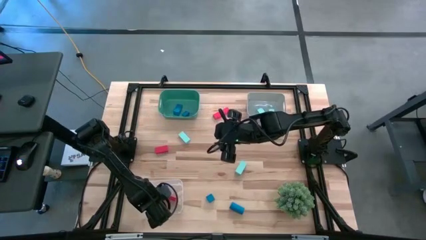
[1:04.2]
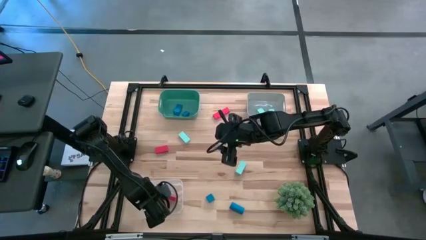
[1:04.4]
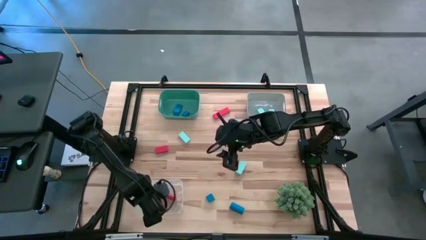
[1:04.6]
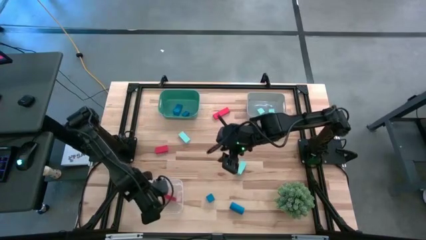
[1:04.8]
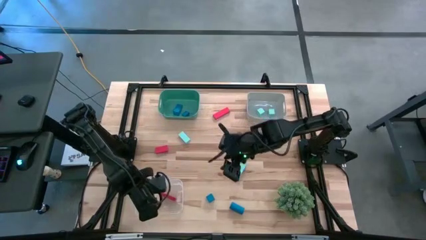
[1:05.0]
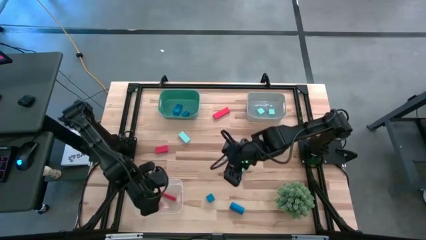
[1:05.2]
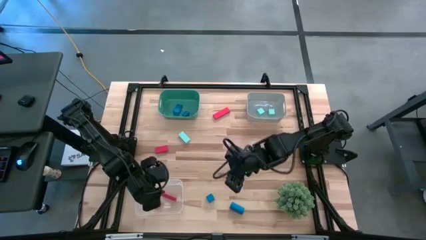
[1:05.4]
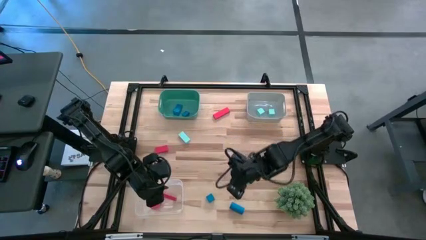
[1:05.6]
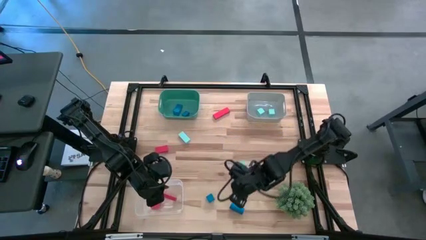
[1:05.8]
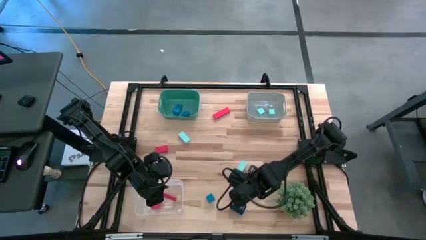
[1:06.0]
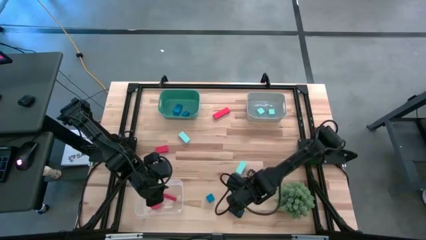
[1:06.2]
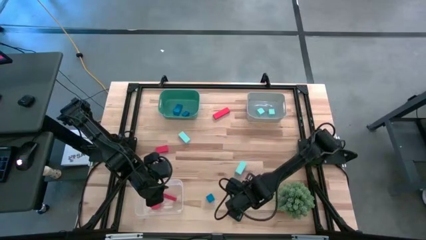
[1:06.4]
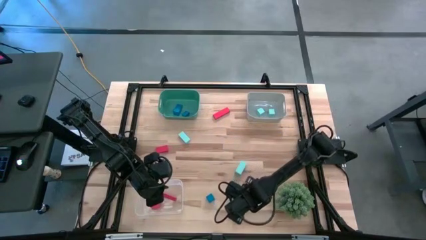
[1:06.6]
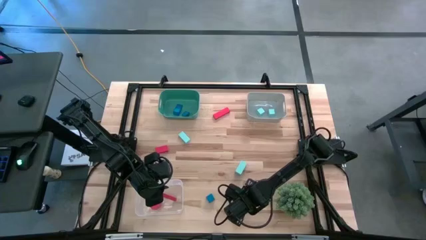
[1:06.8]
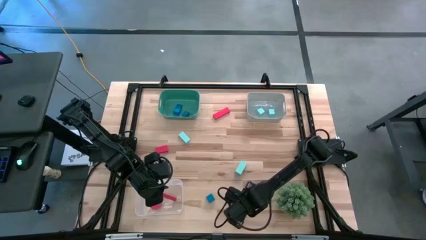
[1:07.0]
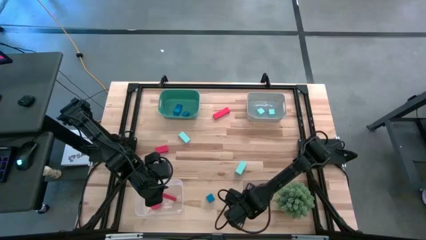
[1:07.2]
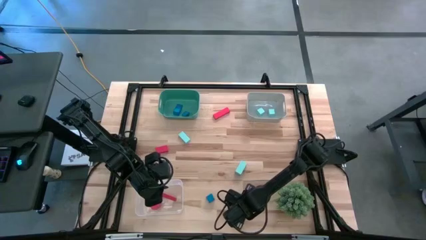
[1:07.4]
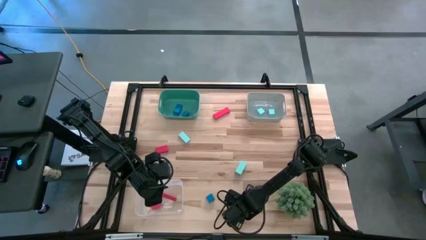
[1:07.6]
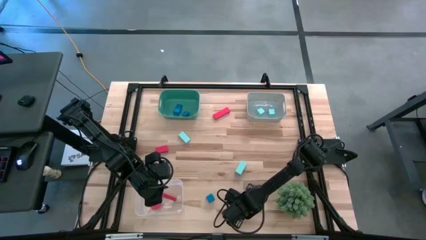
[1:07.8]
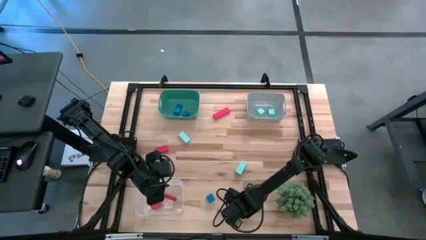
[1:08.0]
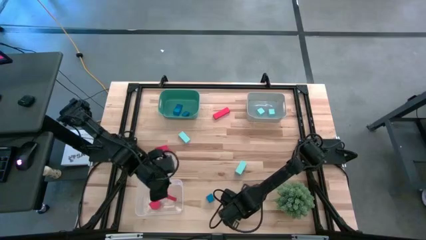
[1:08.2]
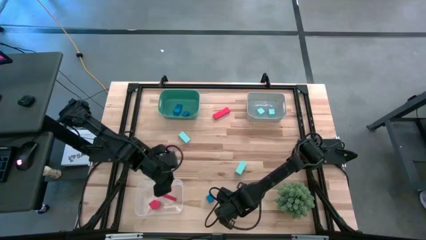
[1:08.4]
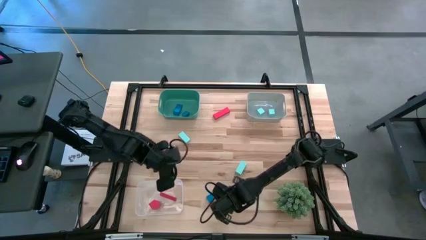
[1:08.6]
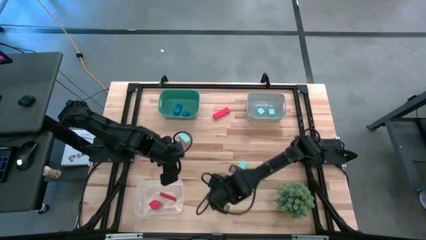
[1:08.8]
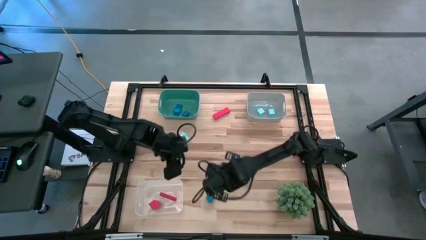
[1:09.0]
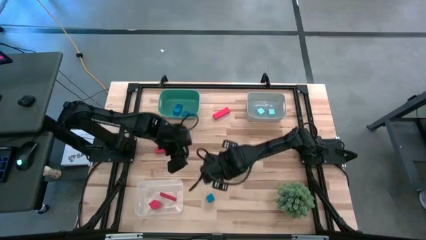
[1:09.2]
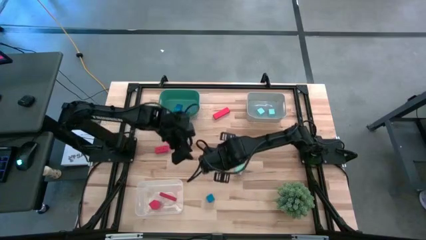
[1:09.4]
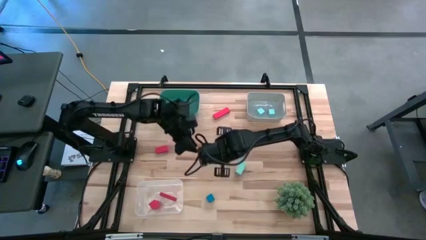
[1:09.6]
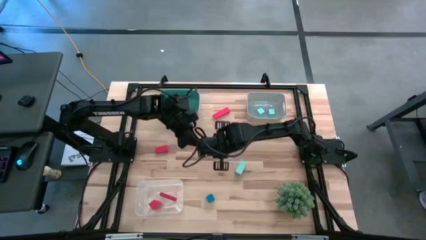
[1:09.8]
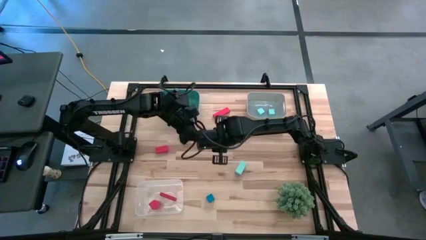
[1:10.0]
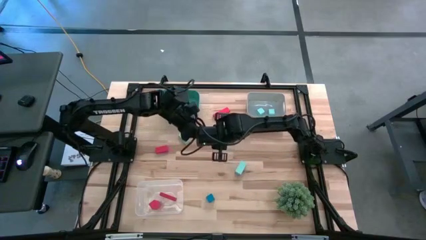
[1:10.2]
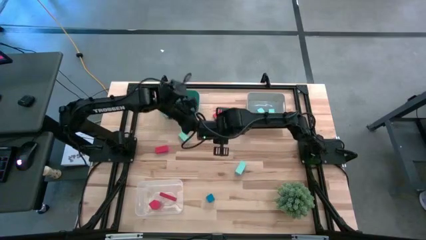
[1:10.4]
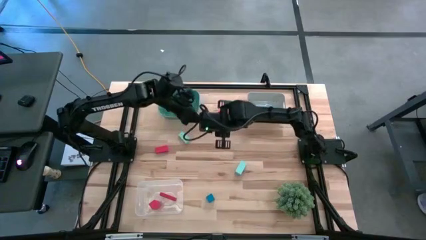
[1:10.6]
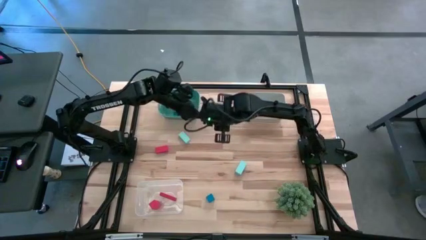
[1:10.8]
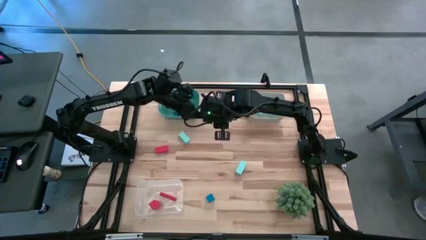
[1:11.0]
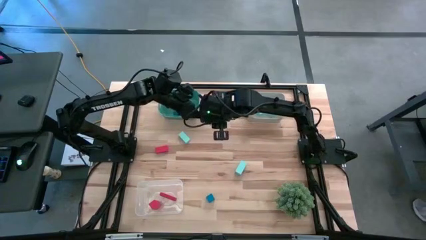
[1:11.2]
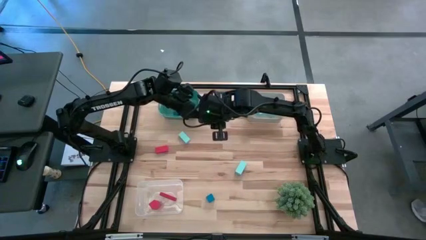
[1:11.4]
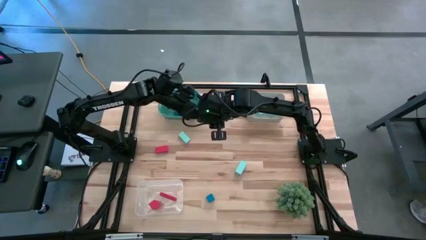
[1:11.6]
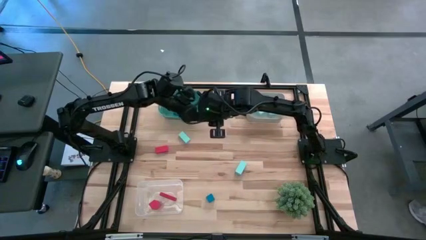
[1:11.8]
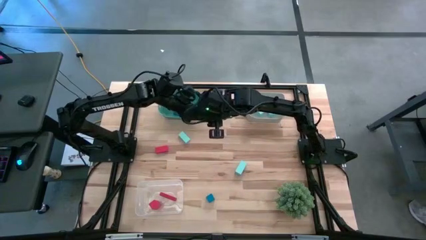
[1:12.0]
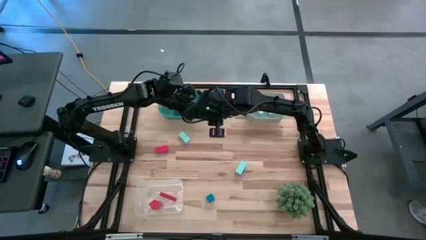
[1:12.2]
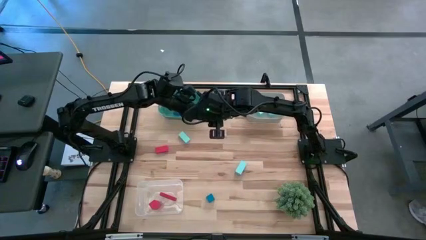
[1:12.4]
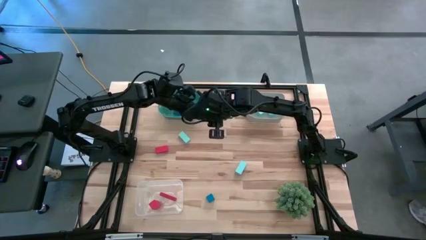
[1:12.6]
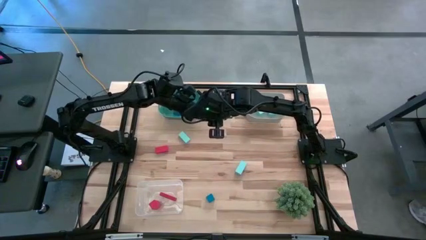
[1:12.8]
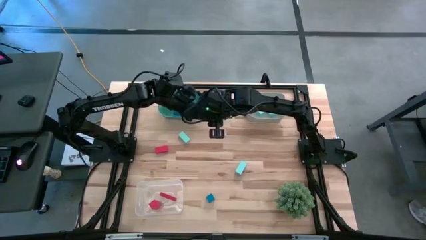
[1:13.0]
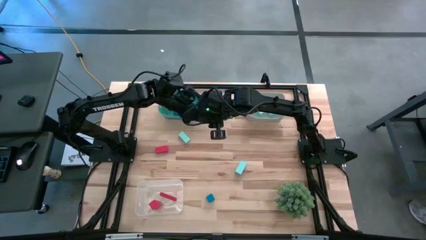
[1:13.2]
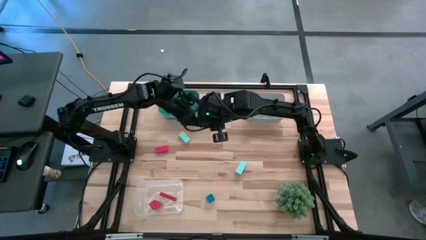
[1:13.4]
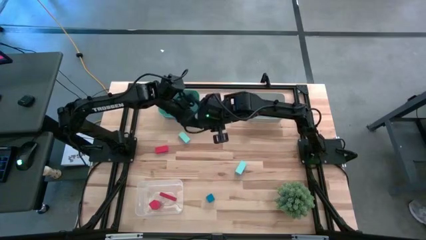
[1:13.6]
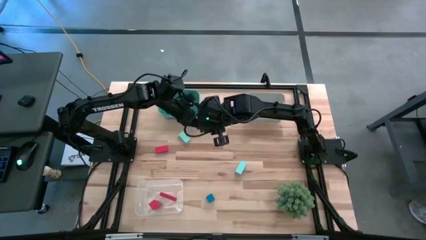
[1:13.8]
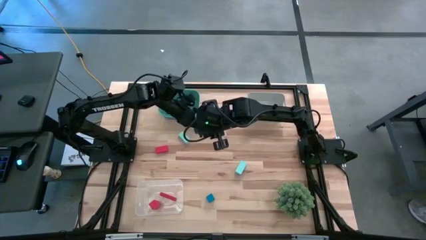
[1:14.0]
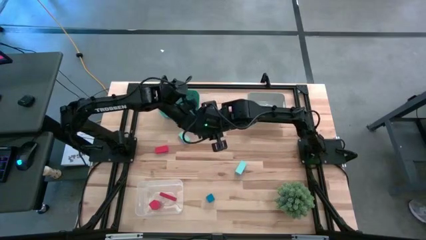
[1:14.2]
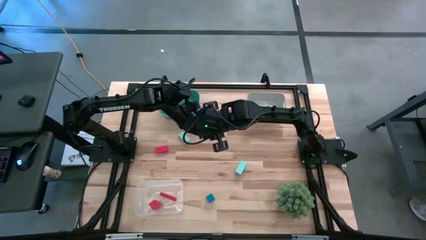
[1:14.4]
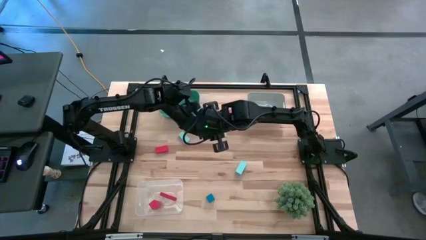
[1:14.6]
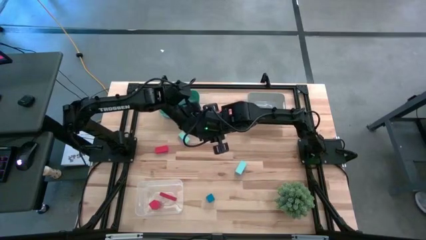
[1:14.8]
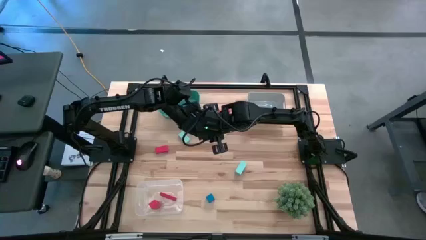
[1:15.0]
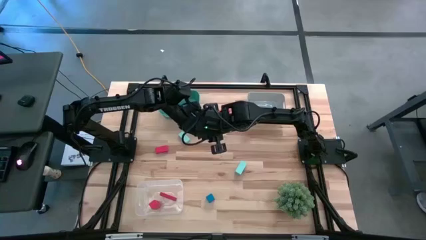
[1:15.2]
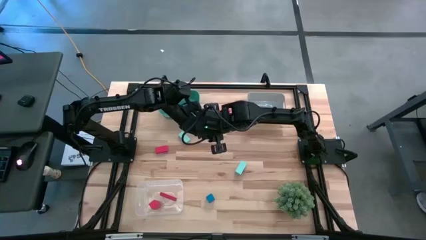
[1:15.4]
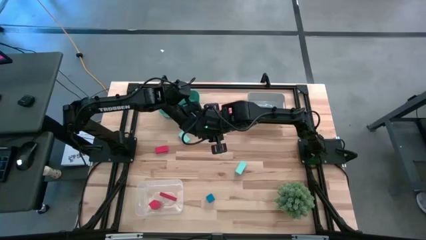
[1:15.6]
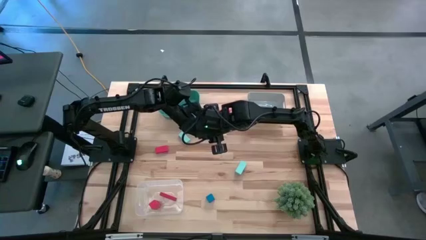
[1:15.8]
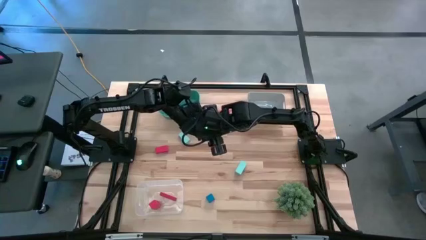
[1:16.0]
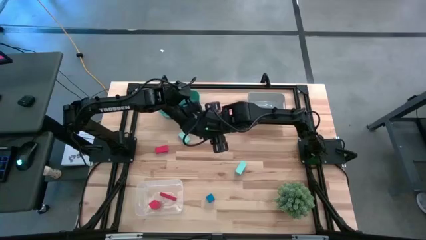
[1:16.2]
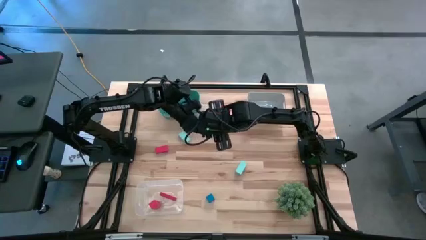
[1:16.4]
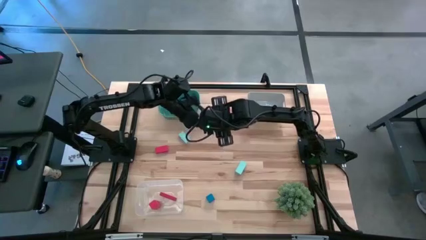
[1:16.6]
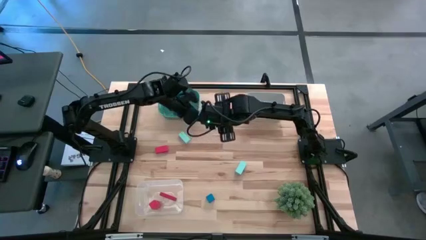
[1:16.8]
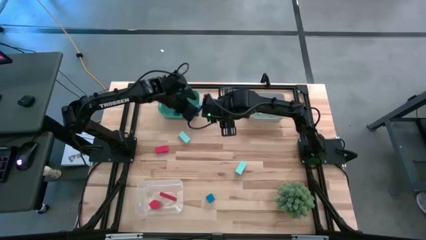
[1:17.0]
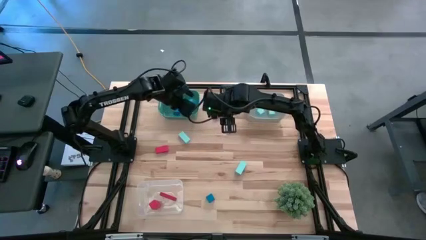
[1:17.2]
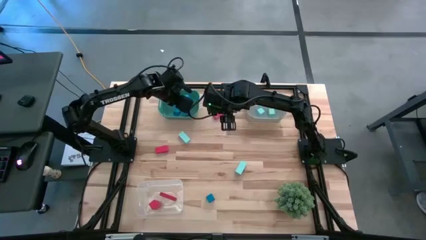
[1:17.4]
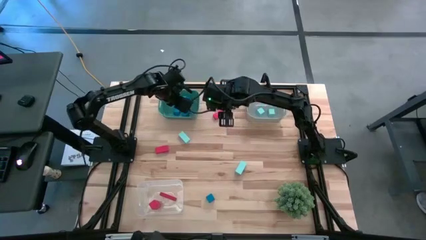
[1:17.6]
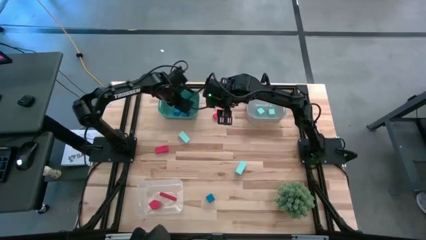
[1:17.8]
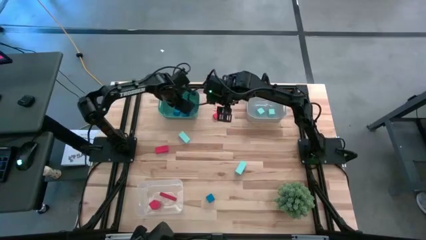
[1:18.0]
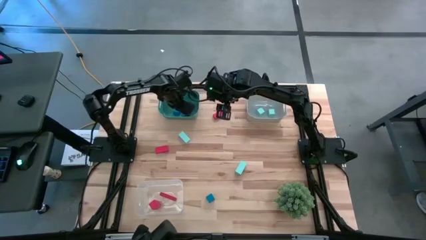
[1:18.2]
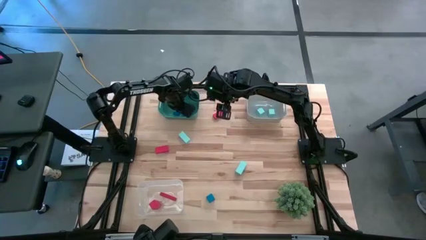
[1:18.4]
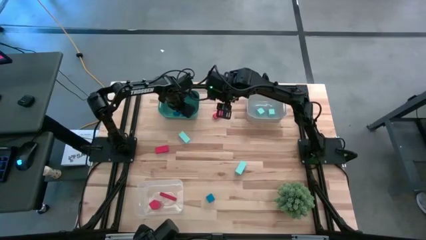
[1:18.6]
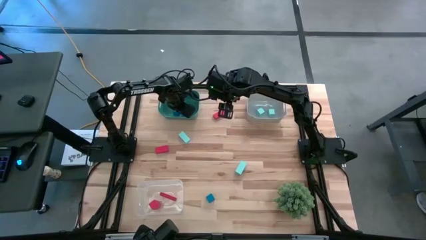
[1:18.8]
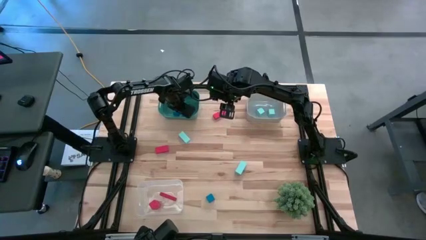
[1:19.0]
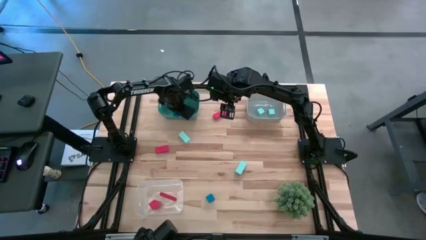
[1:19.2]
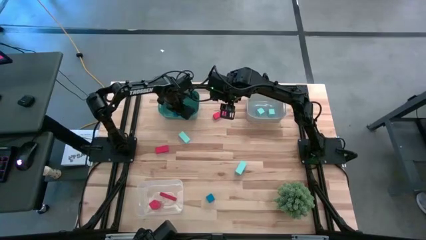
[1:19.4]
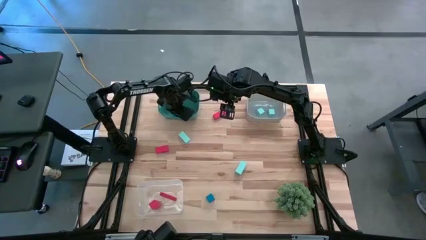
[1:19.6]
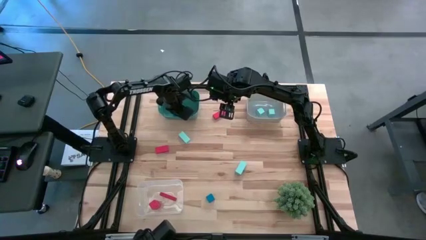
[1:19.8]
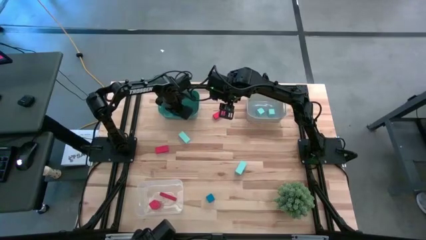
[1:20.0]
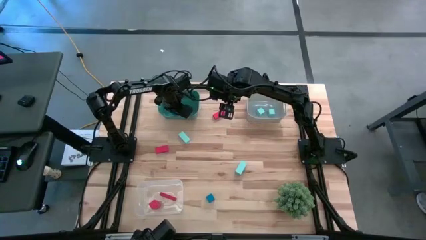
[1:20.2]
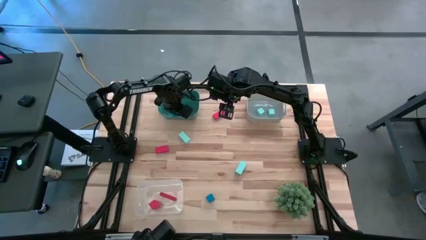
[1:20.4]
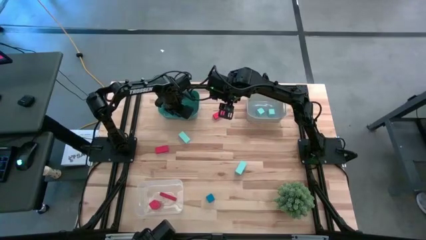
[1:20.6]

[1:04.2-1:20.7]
Task: Sort & place blocks by color
Put the blue block into the green bin
